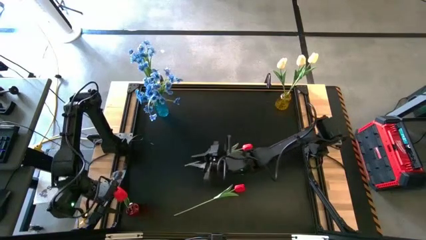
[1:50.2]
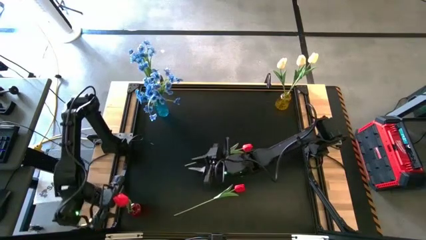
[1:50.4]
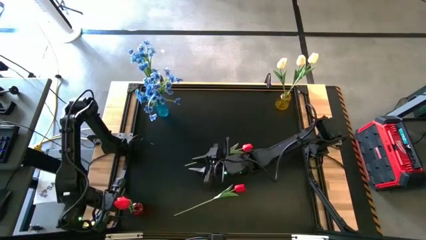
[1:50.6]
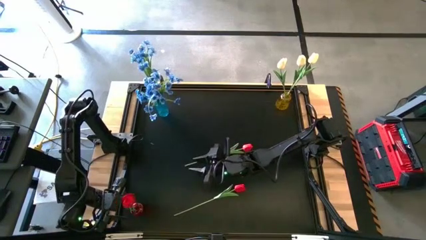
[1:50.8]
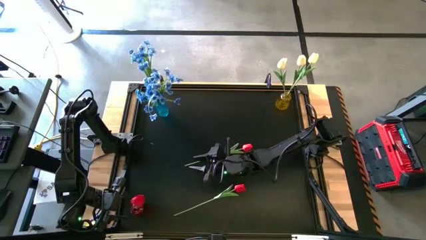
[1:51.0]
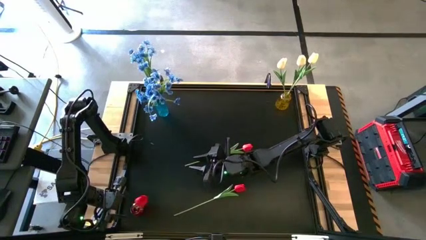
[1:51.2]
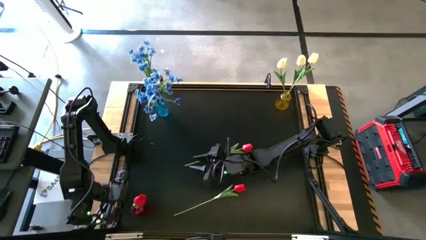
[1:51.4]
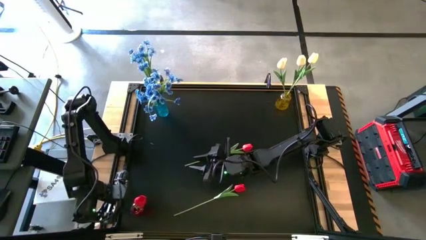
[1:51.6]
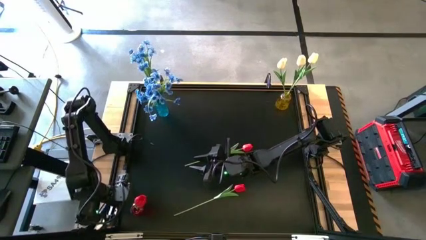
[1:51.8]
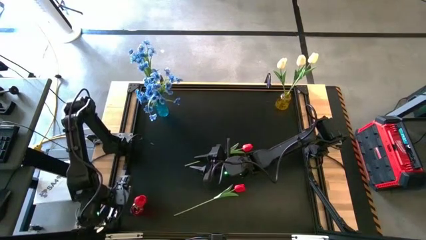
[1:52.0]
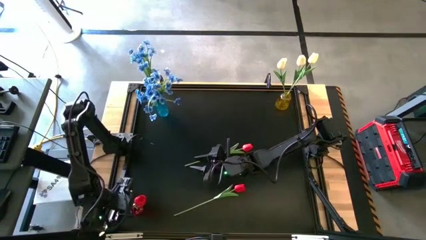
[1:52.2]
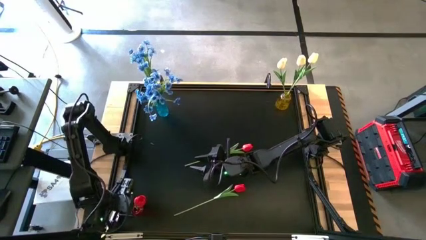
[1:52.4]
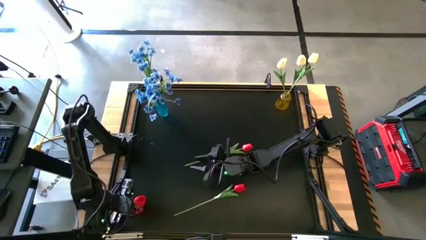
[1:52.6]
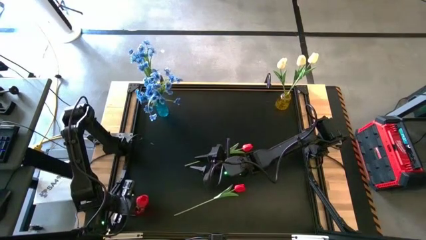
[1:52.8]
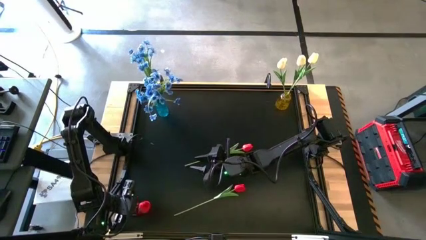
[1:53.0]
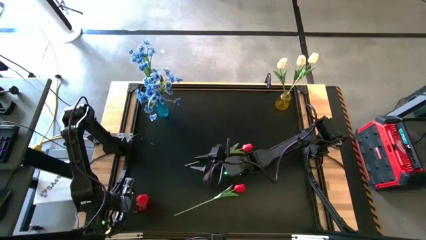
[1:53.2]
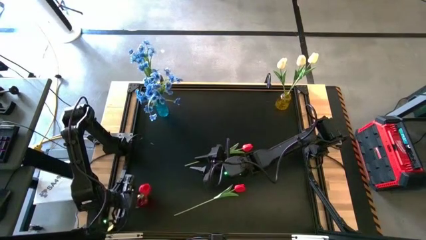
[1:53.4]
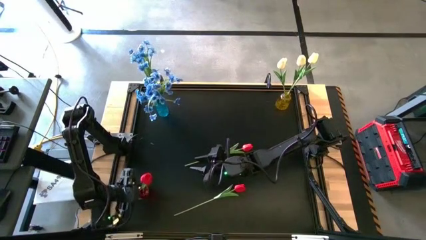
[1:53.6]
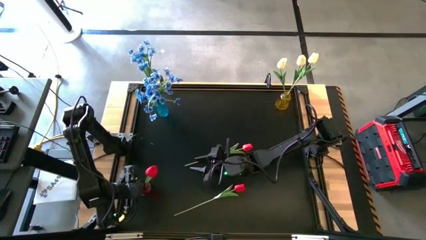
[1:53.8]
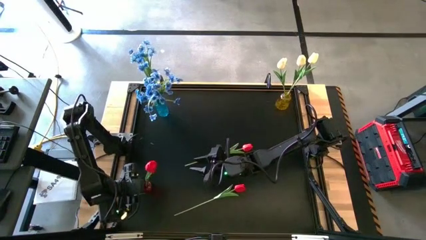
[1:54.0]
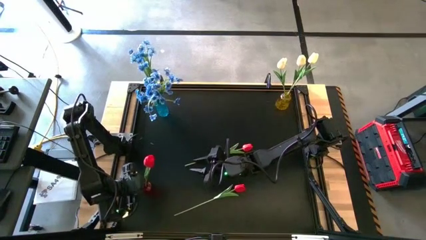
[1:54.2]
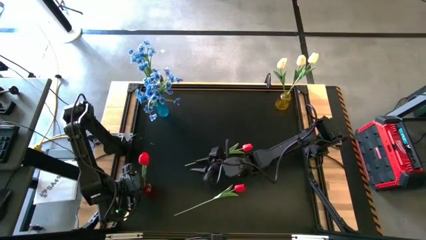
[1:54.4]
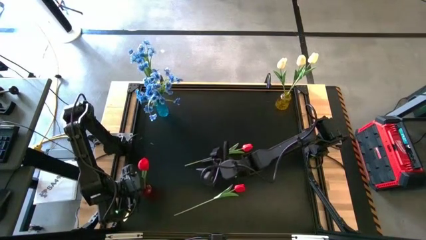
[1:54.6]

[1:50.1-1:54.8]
Task: Sort flowers into vase by color
Adjust the red vase

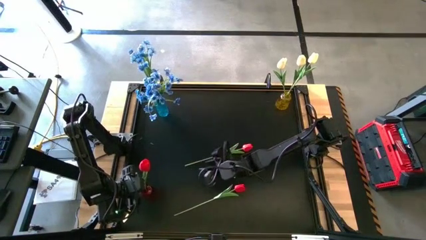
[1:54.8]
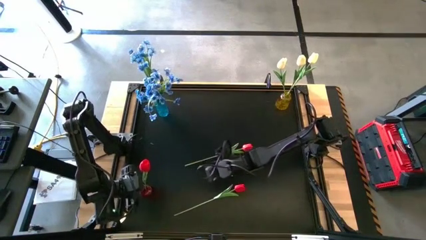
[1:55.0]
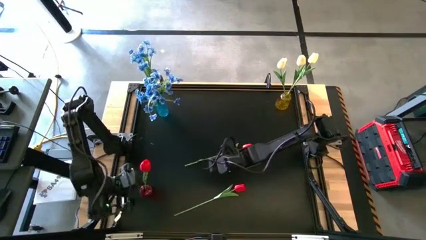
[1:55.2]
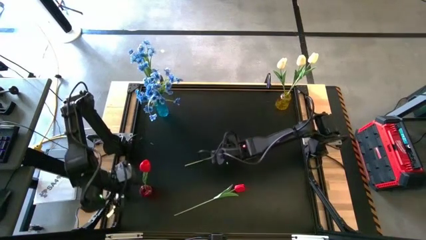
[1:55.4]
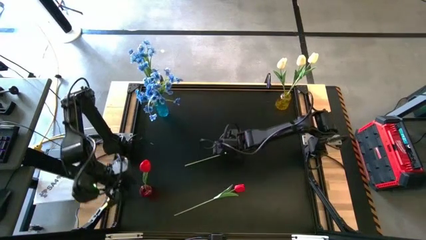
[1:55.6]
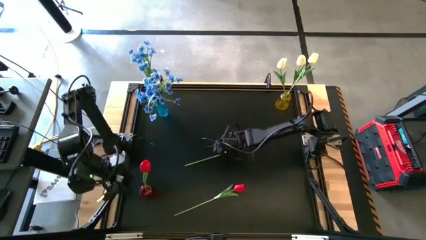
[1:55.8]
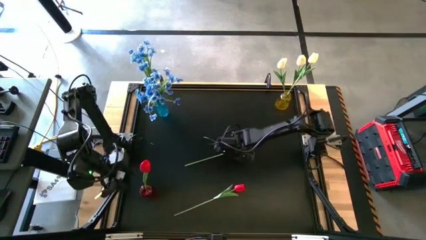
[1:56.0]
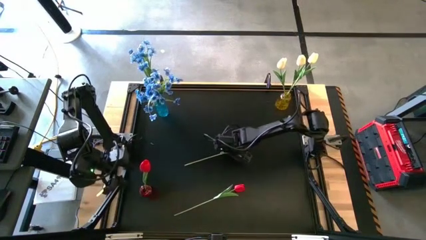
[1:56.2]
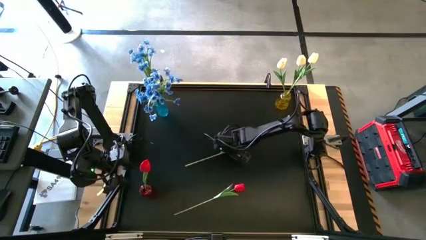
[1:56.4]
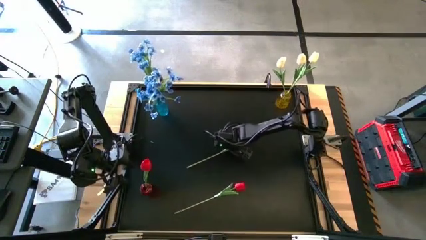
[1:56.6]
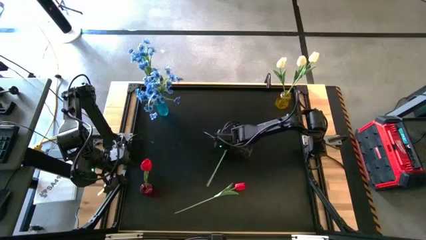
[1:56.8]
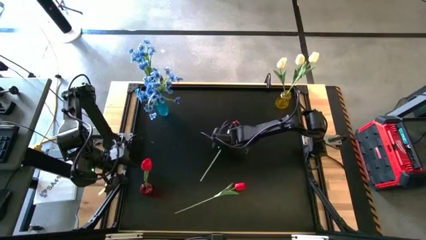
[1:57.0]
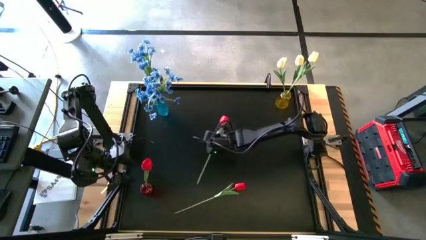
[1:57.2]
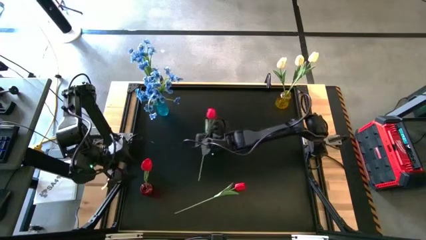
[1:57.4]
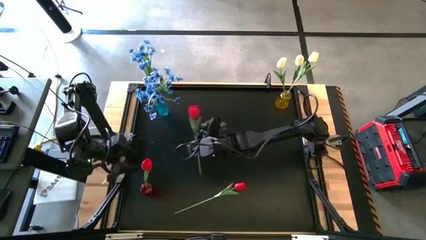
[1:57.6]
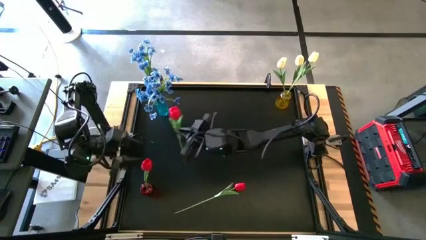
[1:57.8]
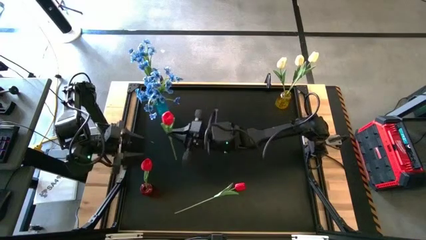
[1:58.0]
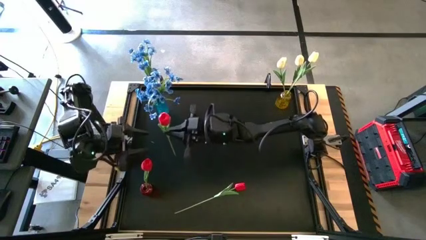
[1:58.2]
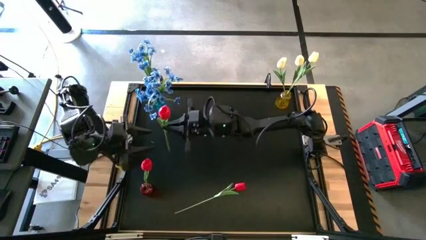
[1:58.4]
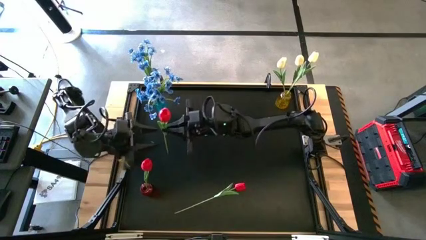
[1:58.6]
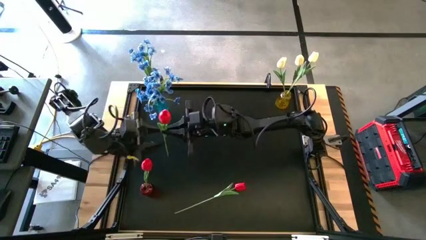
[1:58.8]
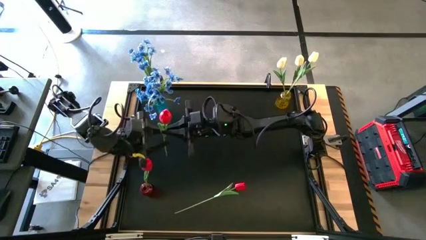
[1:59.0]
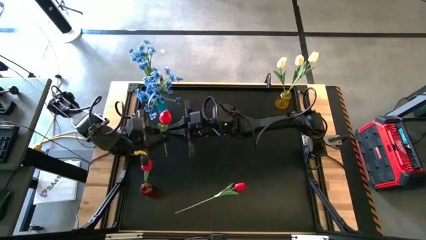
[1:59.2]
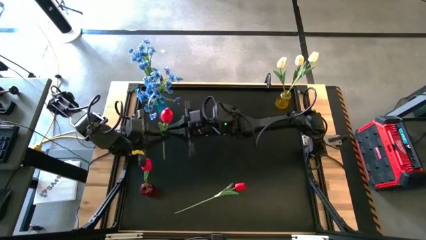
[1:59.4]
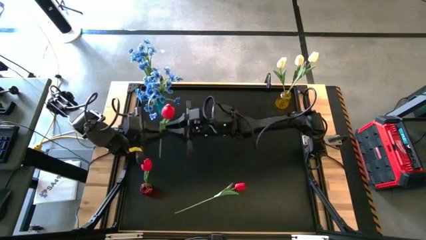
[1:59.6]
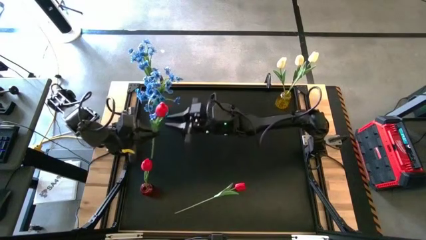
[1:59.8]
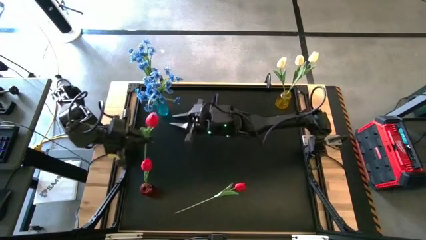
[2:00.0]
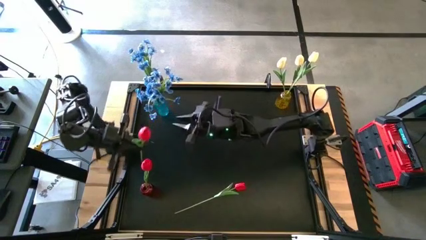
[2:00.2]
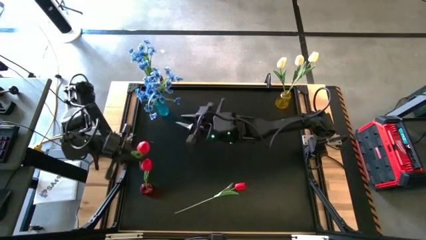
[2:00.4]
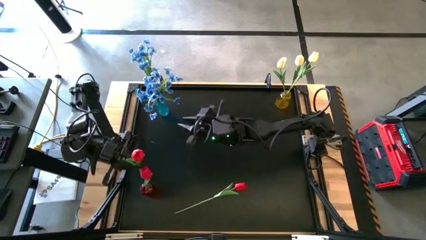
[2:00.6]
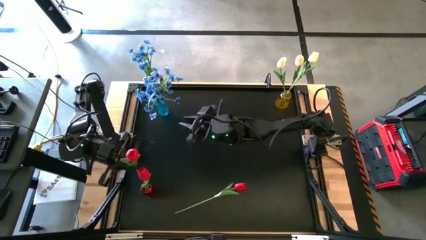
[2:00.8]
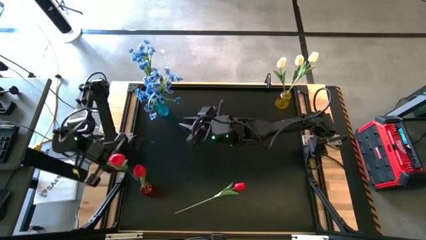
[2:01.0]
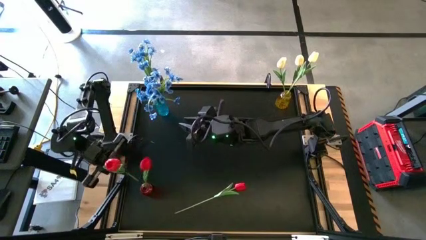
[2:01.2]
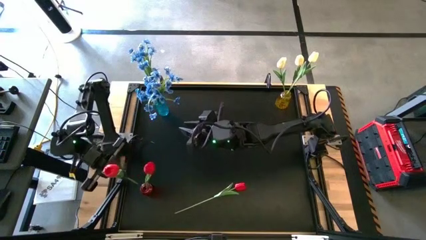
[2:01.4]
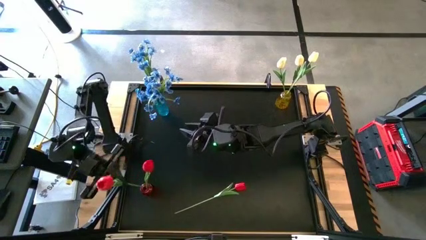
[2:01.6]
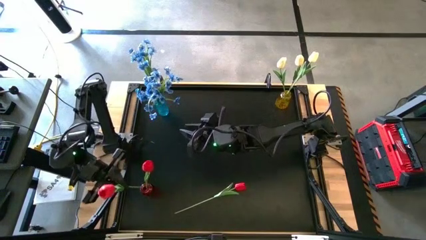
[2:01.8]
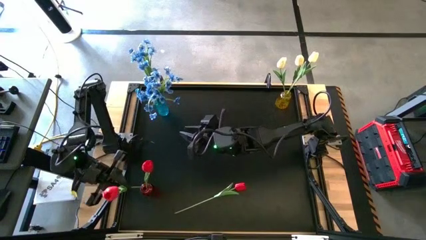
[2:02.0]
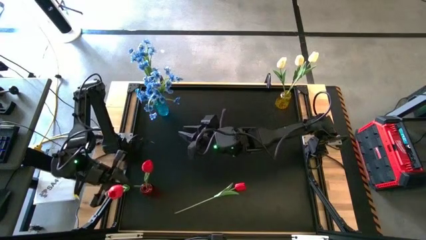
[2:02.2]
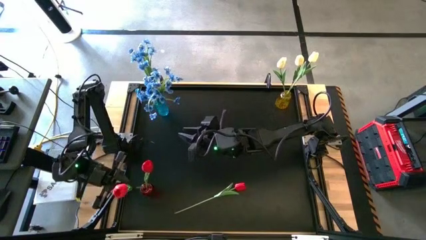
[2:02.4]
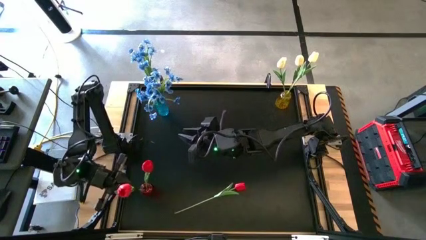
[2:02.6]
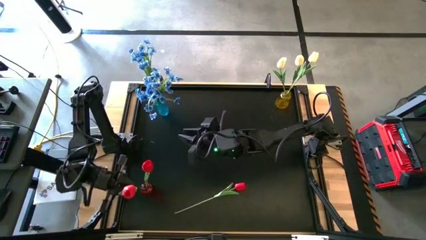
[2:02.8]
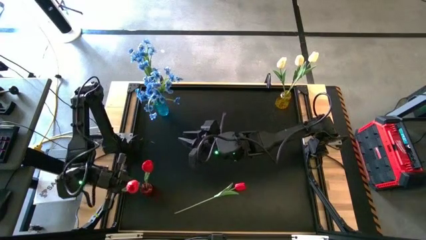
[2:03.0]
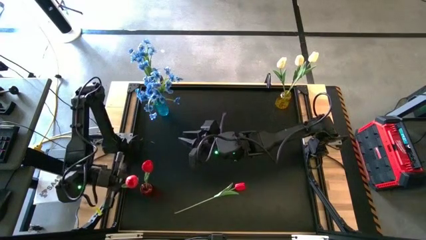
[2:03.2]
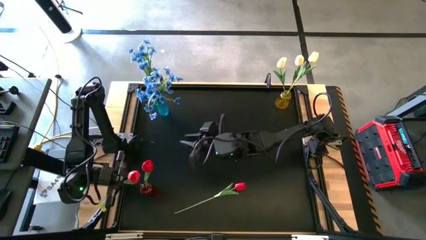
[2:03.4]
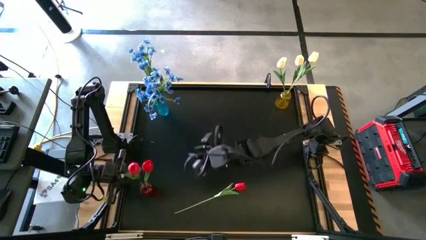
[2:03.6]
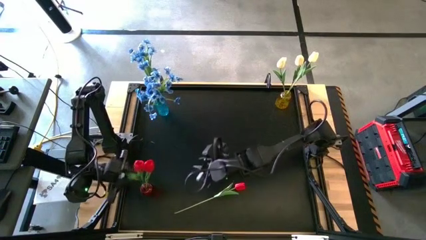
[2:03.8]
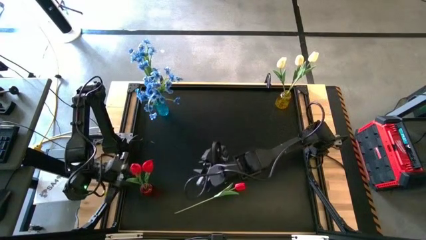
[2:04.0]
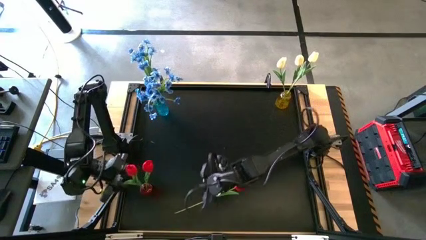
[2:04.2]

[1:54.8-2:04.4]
Put the top red flower into the red vase

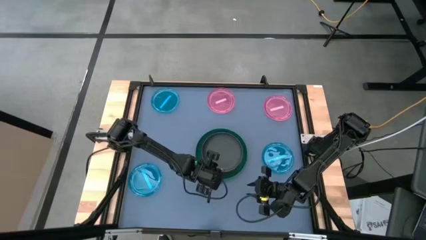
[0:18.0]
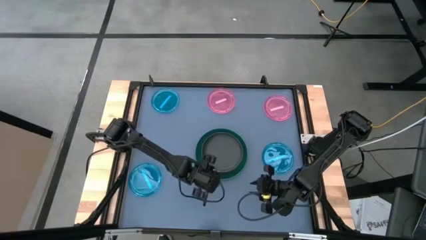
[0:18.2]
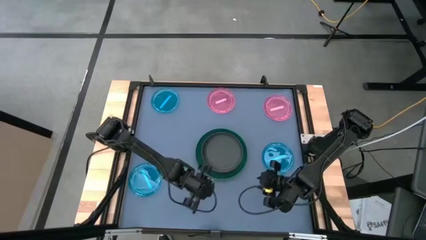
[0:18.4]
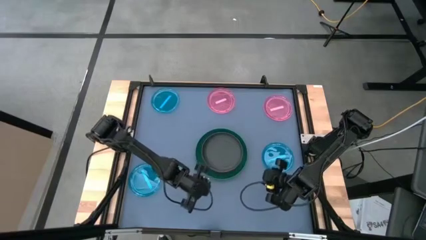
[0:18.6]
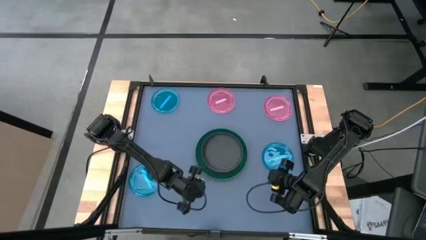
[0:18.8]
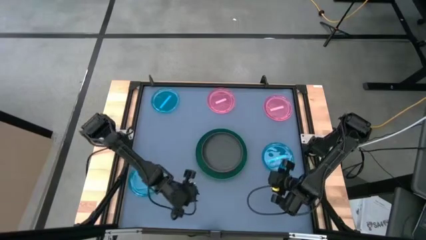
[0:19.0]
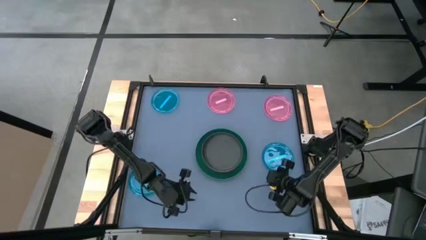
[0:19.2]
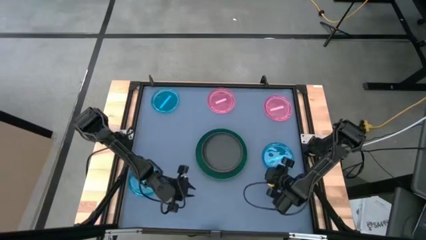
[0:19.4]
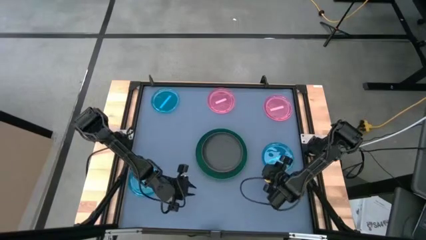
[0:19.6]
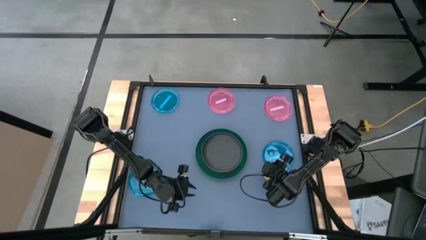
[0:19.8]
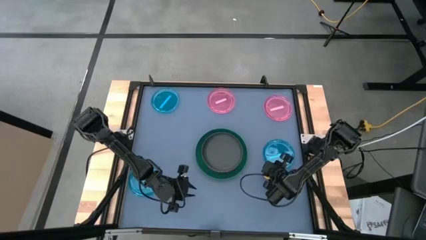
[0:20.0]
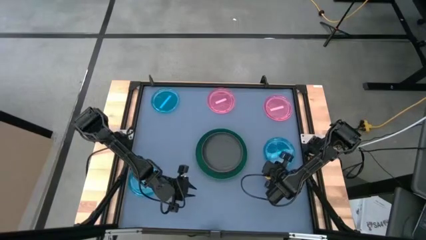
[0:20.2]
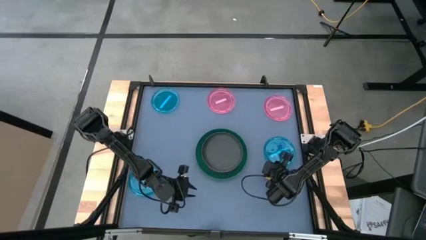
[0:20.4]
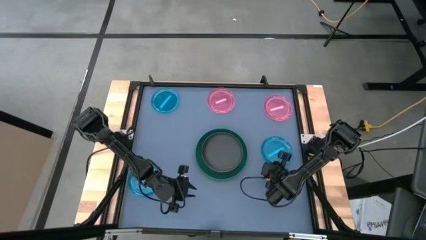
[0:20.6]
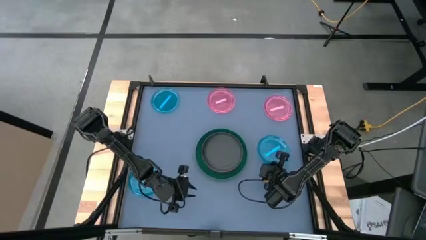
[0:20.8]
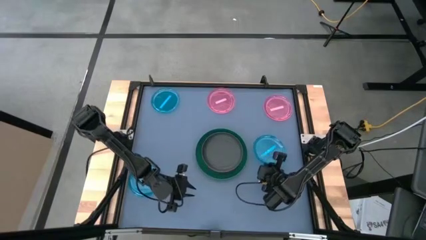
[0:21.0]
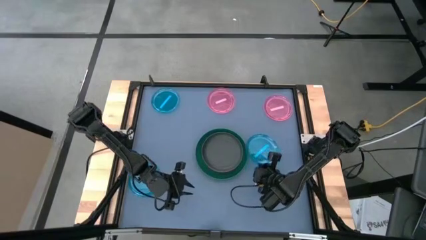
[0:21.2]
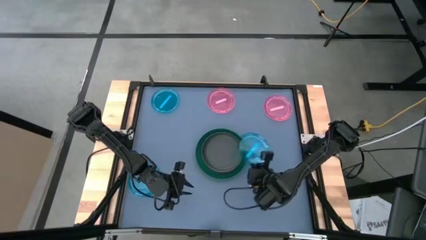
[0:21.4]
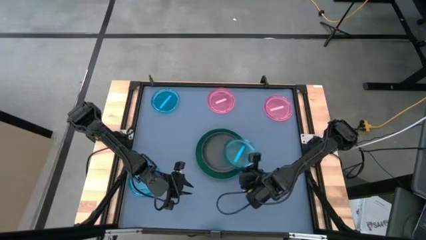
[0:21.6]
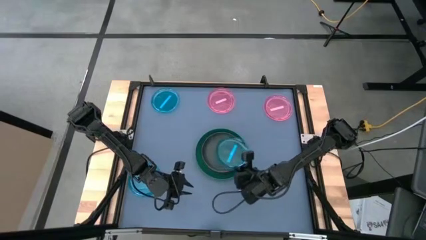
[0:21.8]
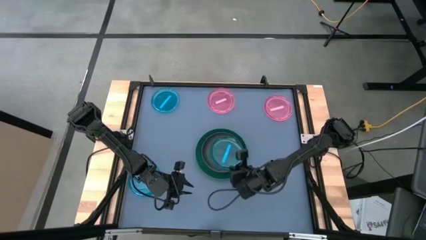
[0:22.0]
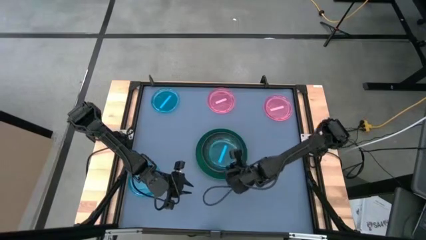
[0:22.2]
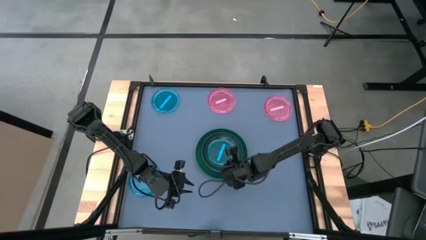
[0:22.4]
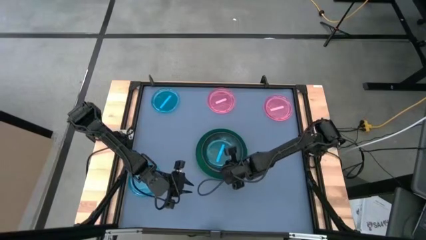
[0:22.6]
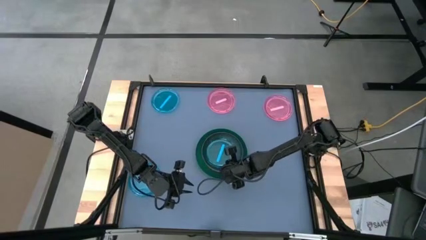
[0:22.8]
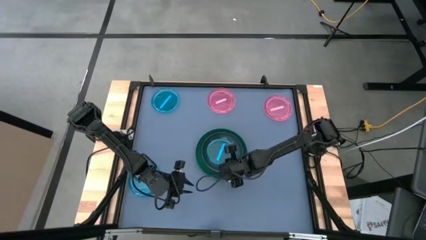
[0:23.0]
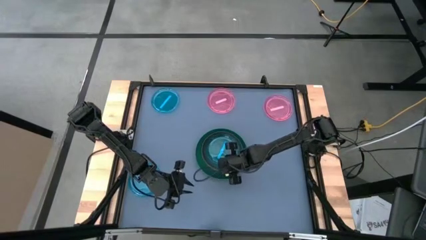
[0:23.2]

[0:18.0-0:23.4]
Task: Stack plastic plates
Stack the right blue plate on top of the black plate
